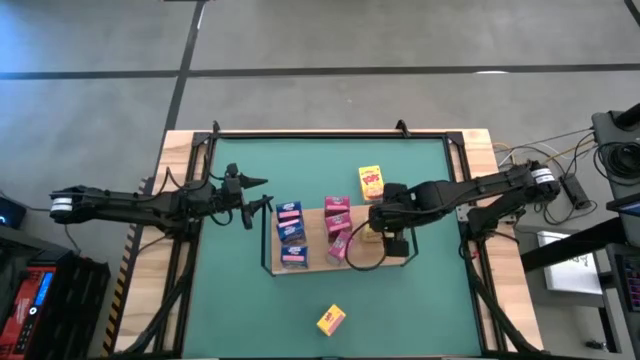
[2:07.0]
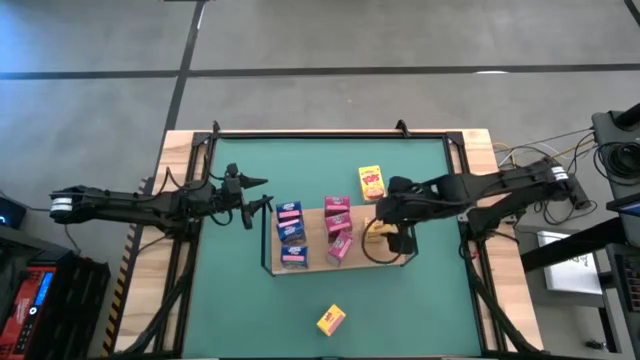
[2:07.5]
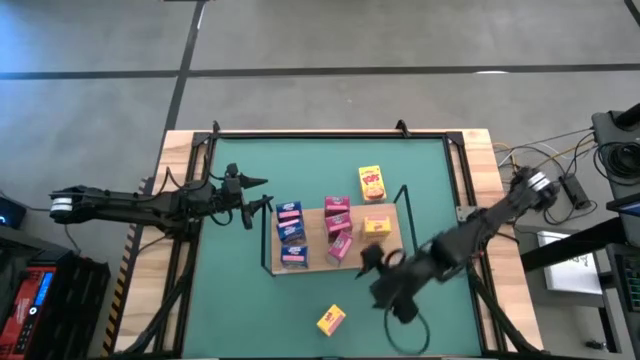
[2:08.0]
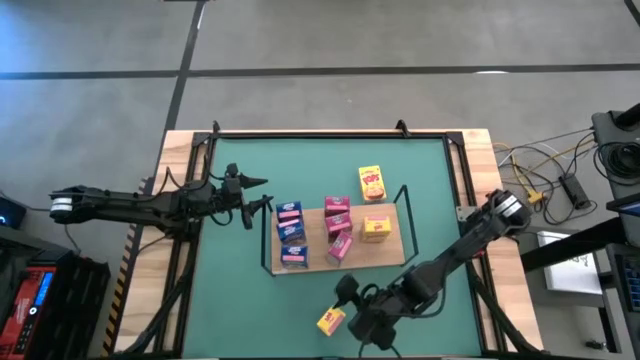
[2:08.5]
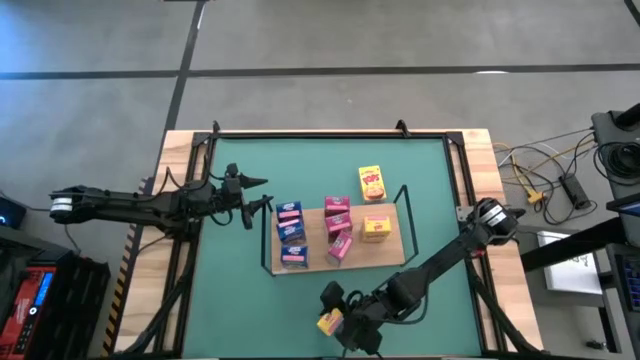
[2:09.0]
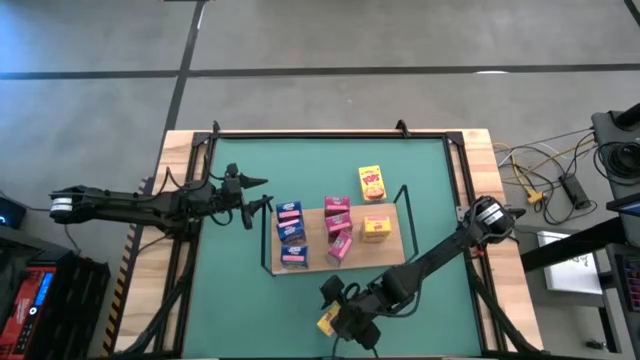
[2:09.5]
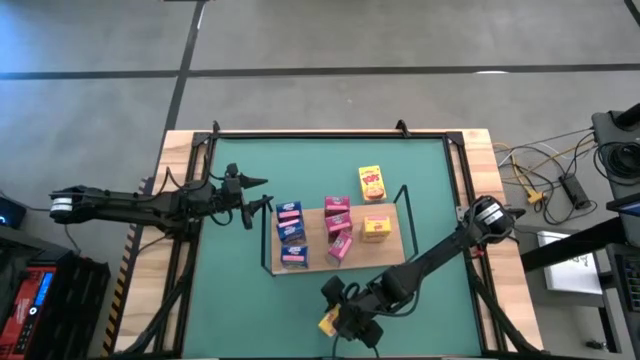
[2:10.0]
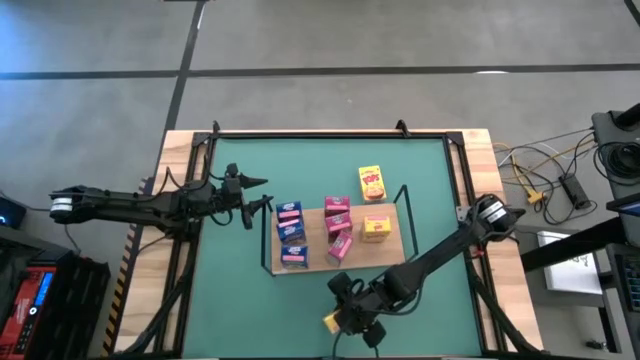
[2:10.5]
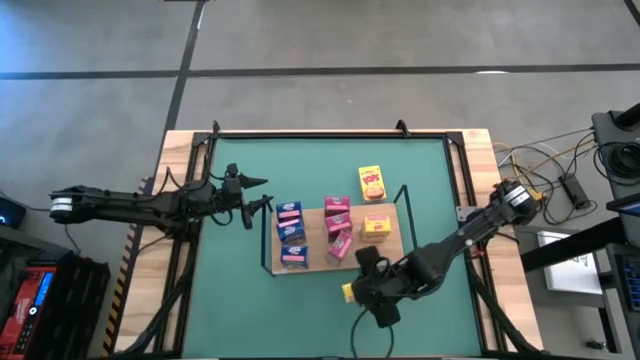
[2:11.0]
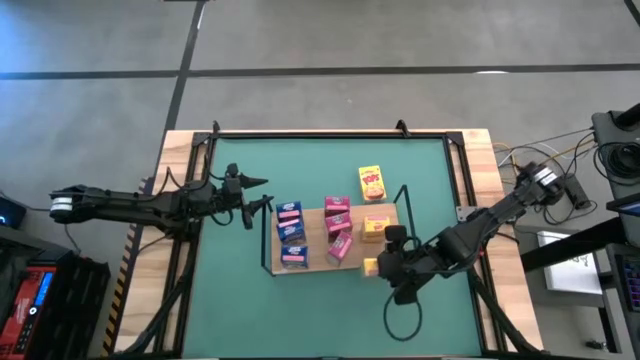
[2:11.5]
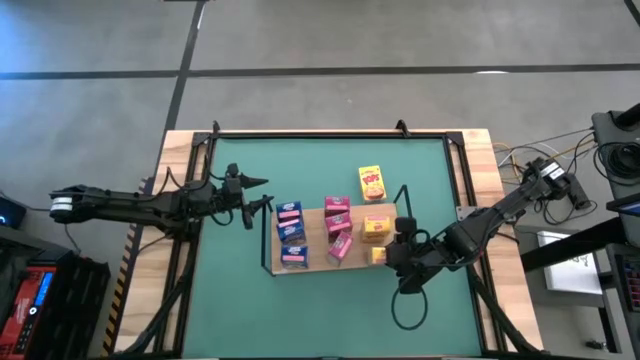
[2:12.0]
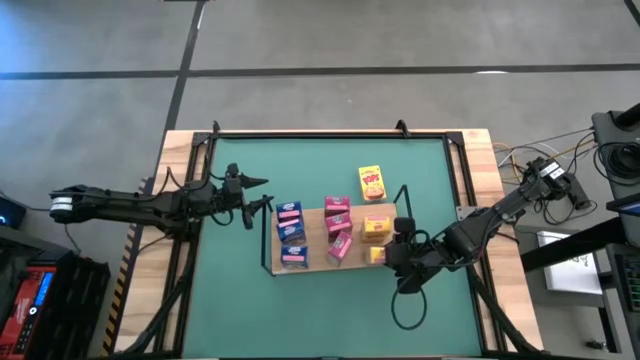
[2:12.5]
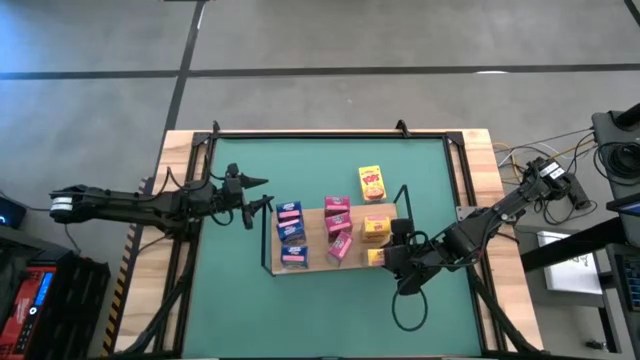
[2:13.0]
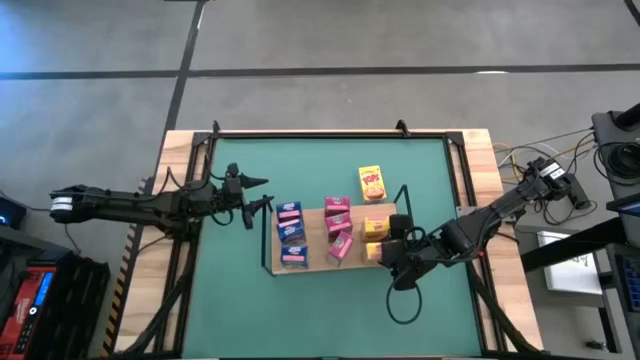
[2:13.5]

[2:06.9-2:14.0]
Task: Stack cereal on shelf
Put the bottom yellow cereal box on the shelf aligned with the other yellow cereal box

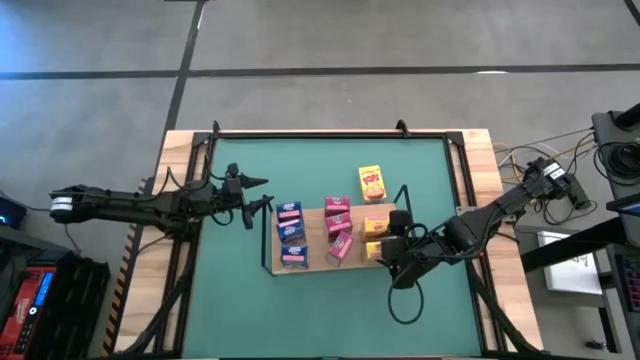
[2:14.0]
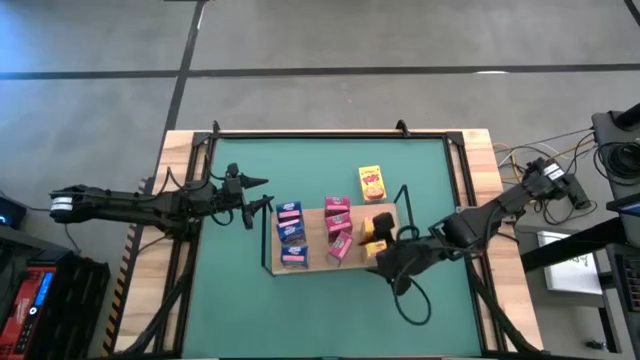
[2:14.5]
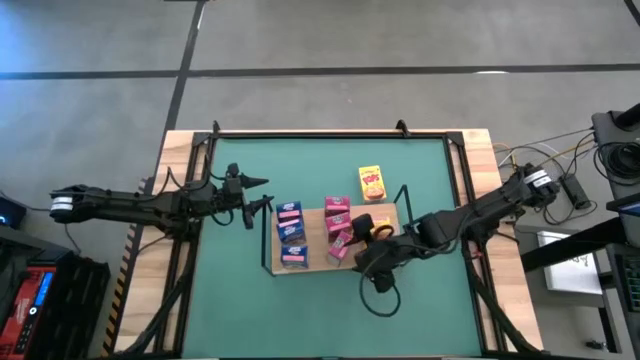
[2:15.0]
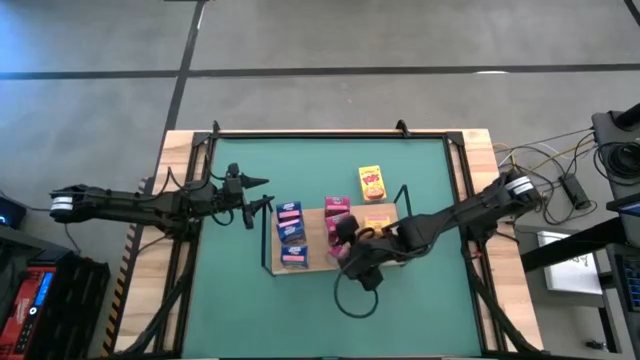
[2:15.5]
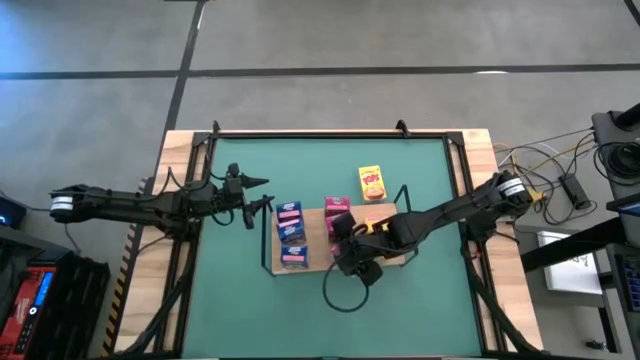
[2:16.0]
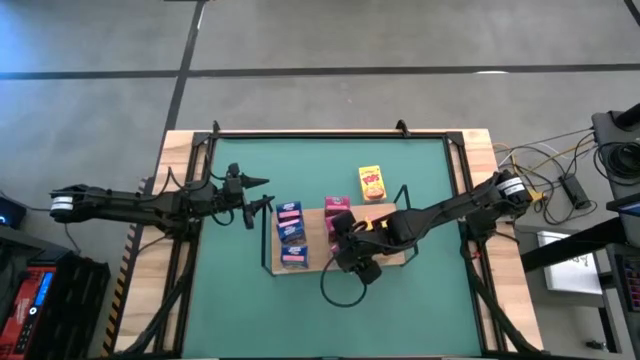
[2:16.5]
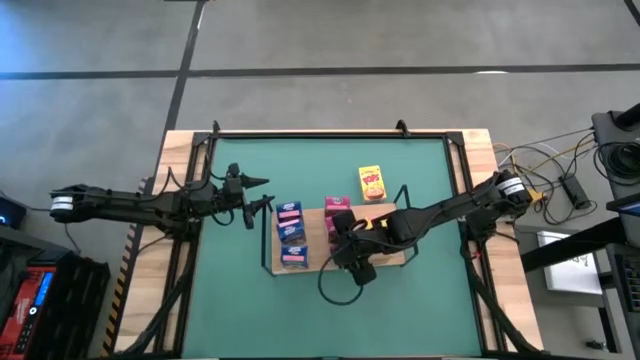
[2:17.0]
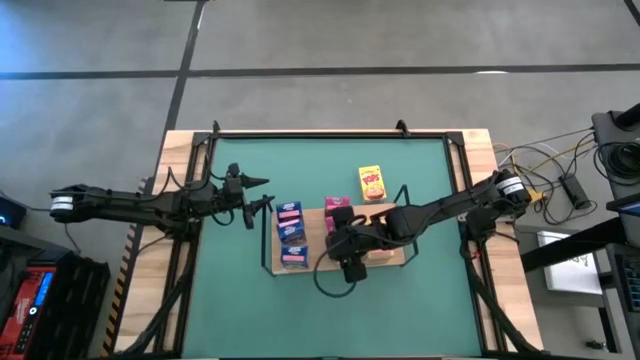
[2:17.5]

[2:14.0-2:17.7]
Adjust the pink cereal box on the shelf

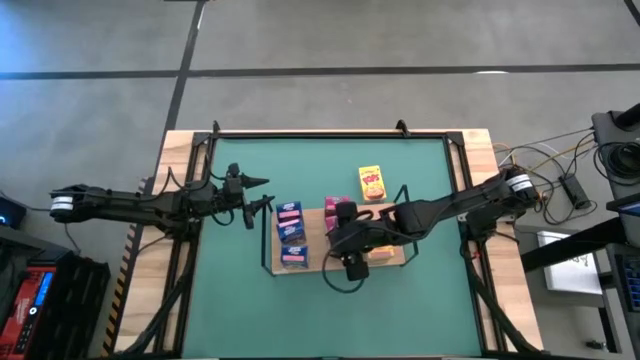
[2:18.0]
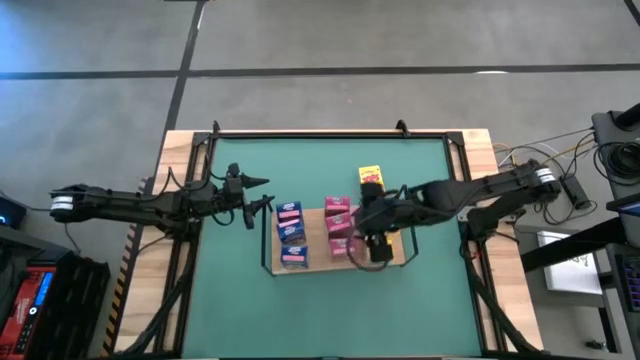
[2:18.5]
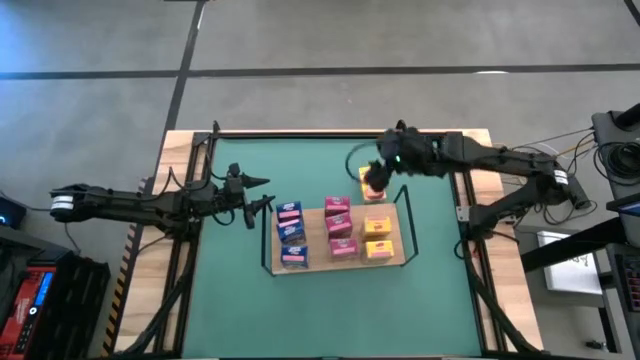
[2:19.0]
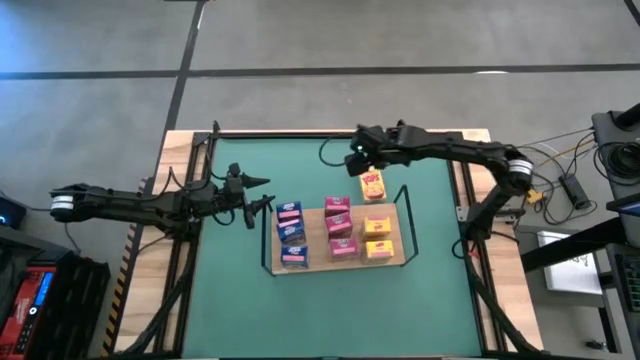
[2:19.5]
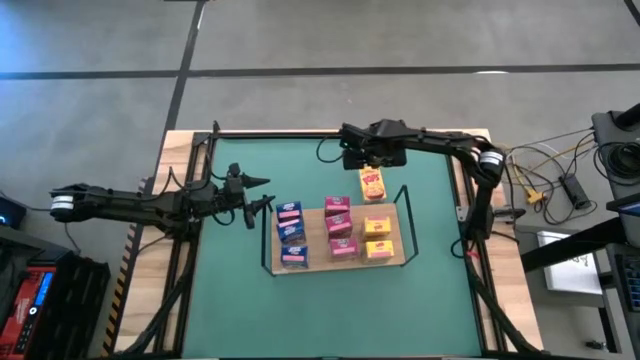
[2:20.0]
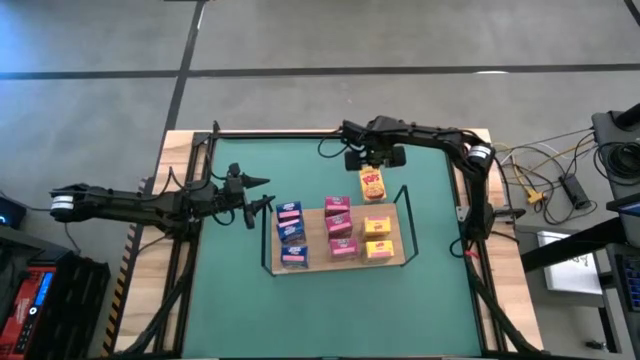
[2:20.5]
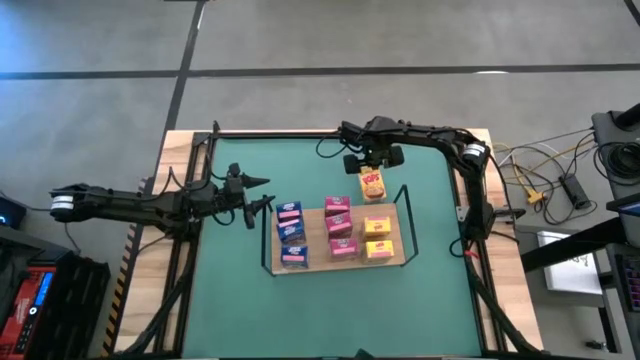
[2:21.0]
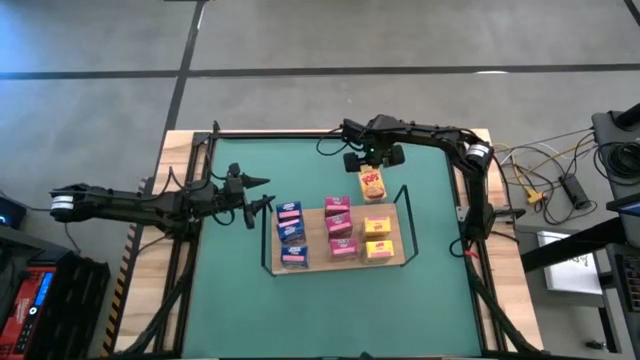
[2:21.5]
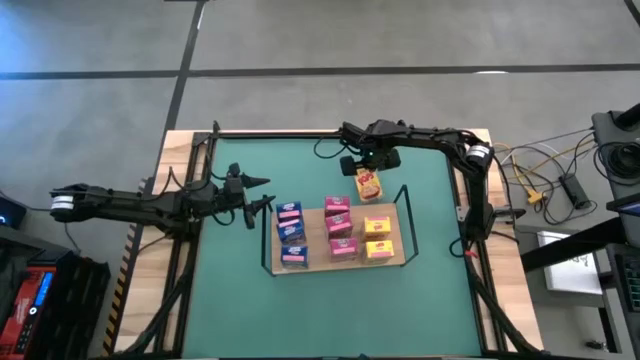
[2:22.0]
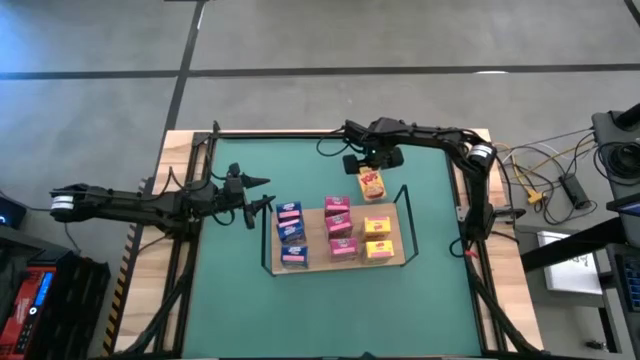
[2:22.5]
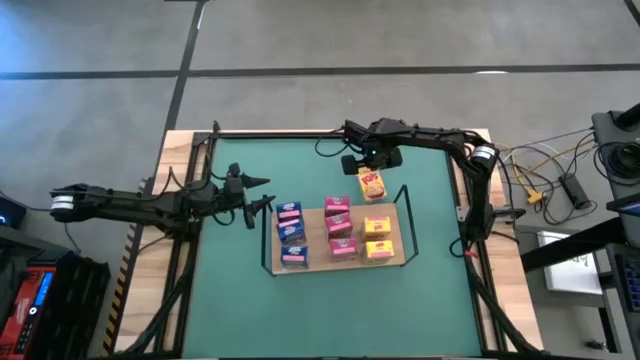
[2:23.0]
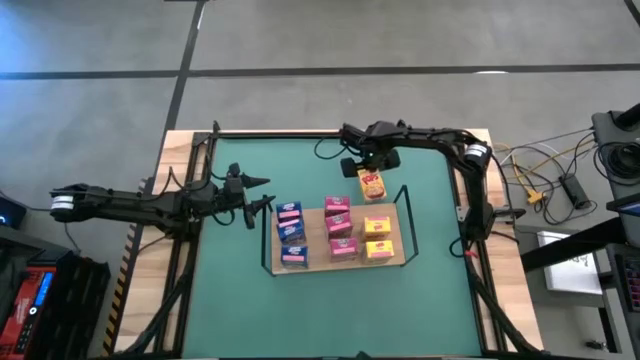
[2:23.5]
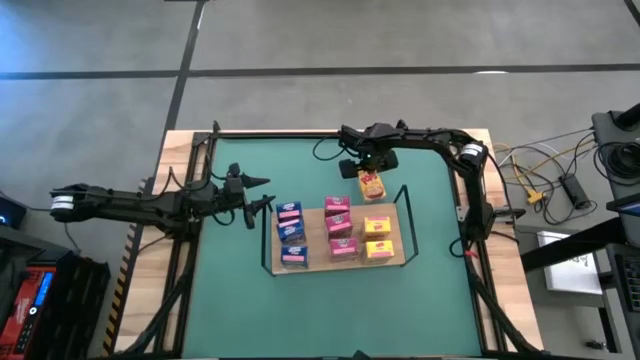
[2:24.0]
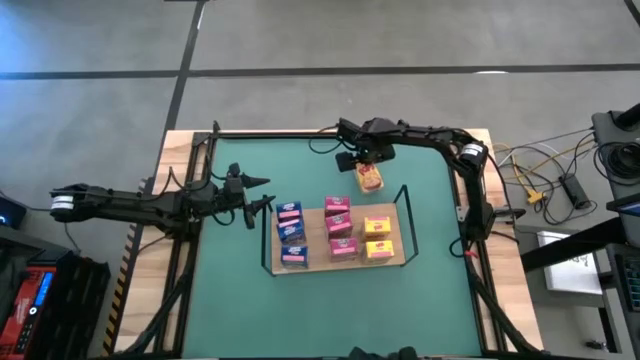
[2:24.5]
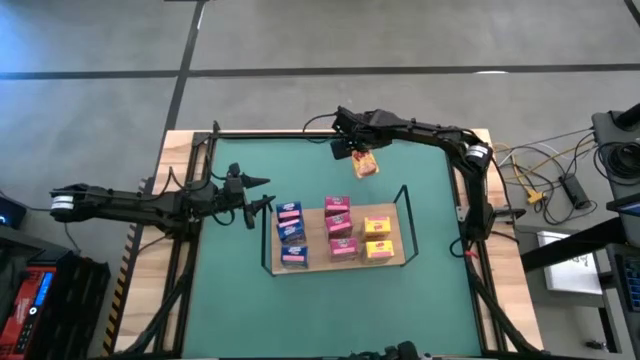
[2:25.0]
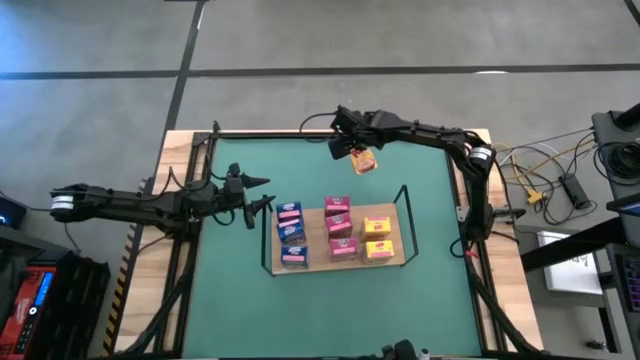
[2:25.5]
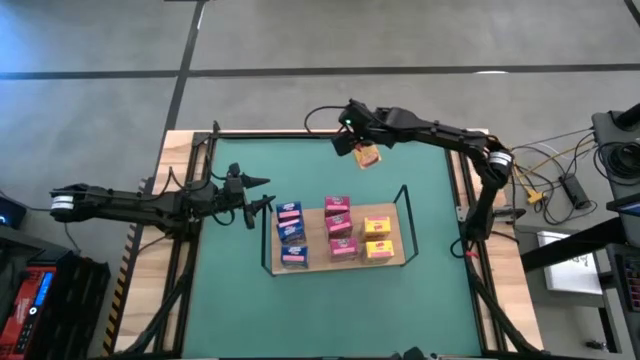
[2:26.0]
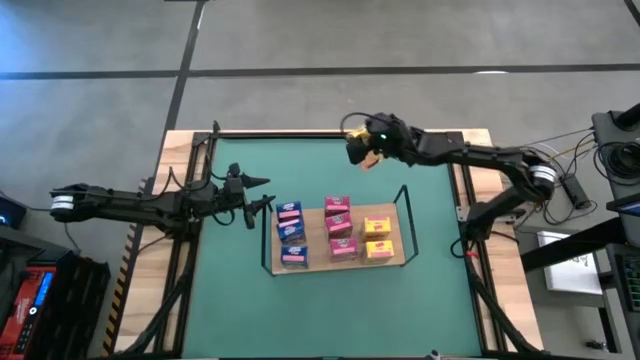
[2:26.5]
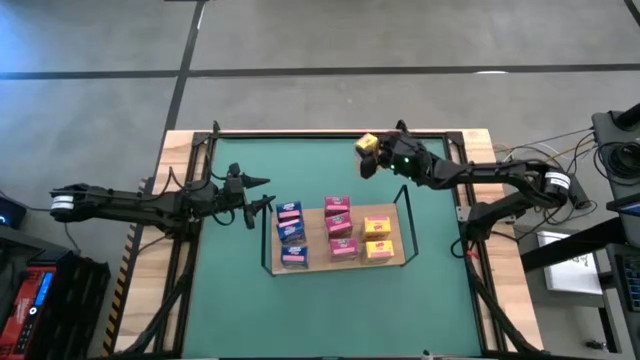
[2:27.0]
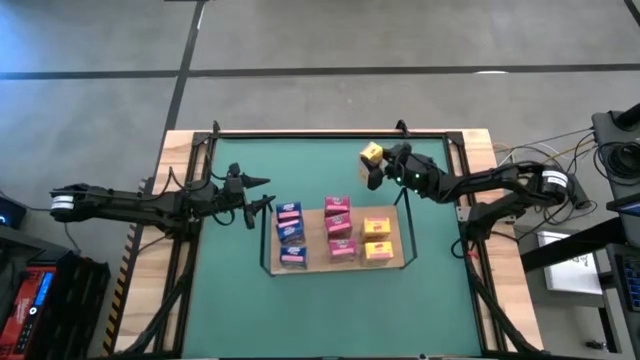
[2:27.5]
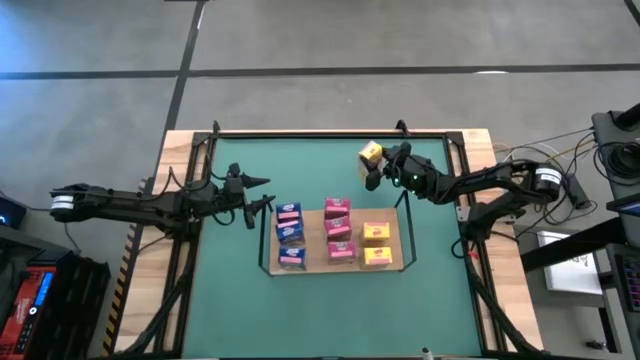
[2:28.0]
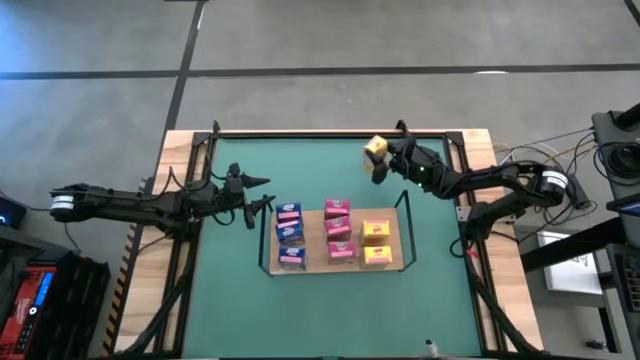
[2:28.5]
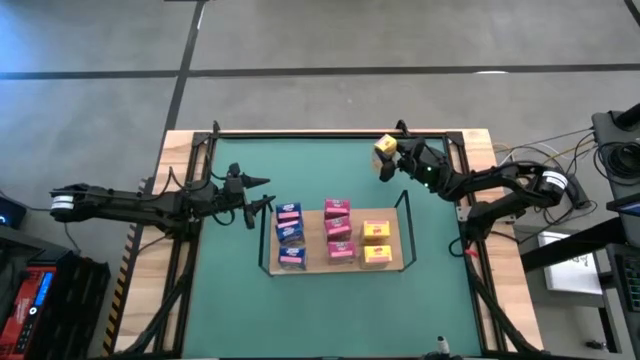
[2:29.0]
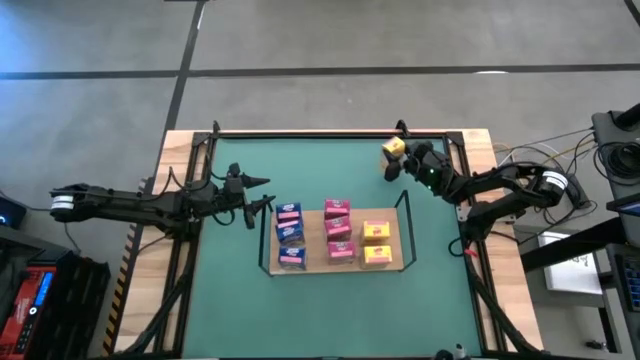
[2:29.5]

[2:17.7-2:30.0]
Put the yellow cereal box on the shelf aligned with the other yellow cereal box
